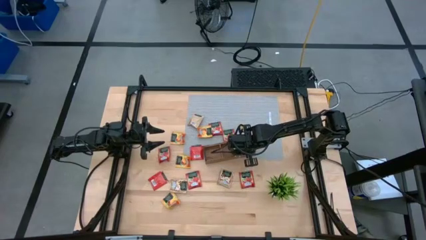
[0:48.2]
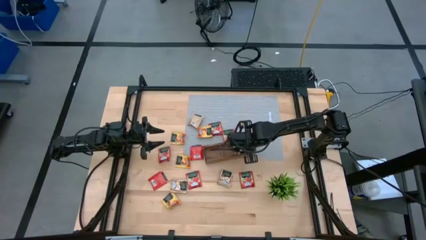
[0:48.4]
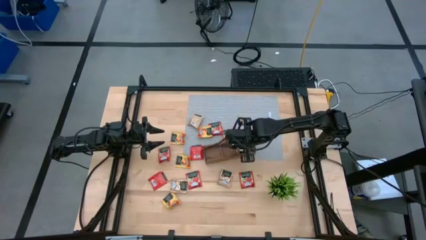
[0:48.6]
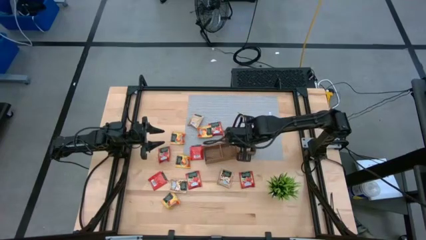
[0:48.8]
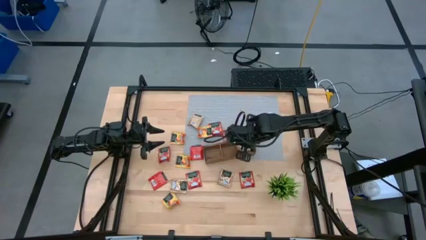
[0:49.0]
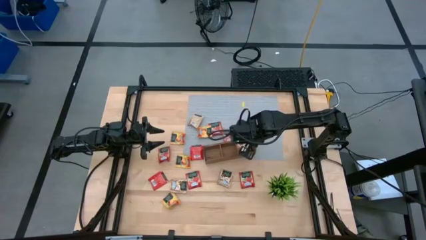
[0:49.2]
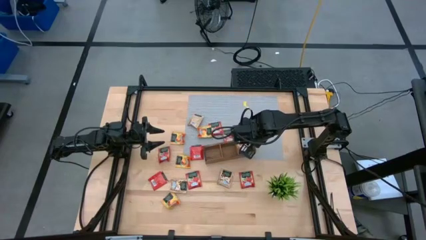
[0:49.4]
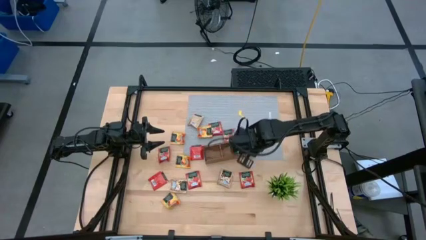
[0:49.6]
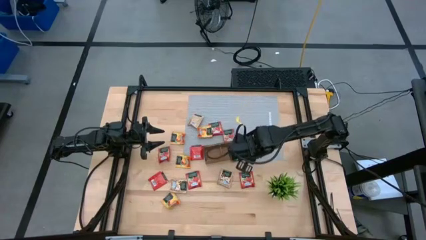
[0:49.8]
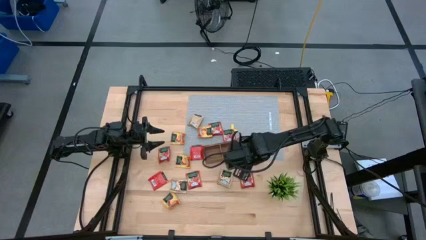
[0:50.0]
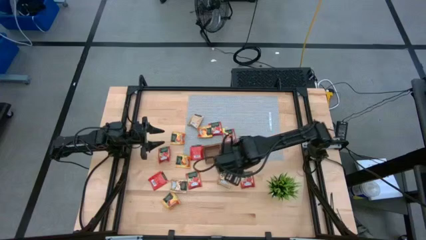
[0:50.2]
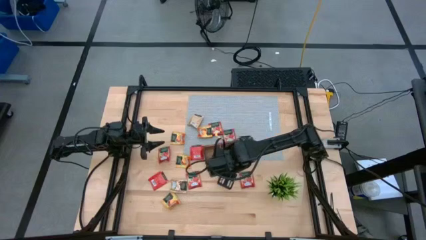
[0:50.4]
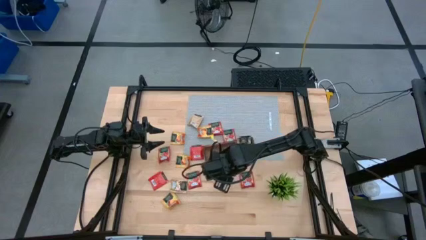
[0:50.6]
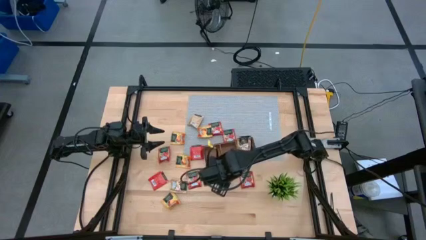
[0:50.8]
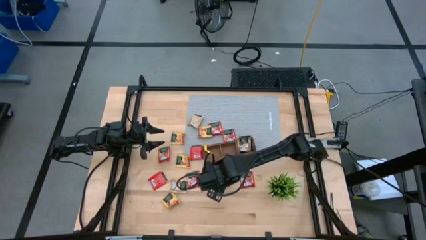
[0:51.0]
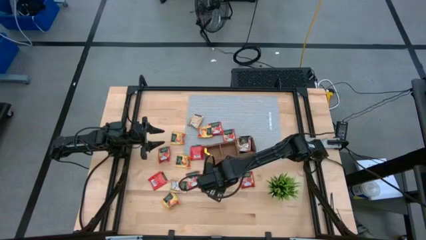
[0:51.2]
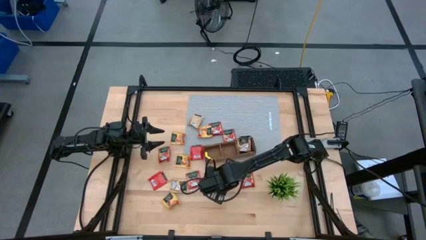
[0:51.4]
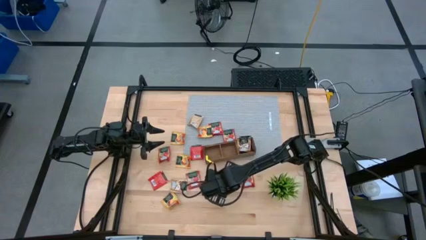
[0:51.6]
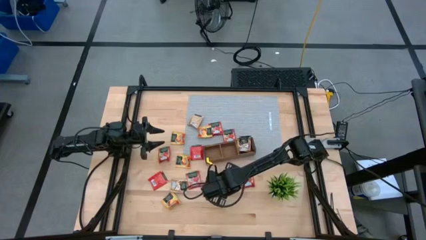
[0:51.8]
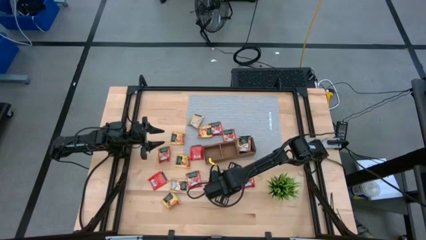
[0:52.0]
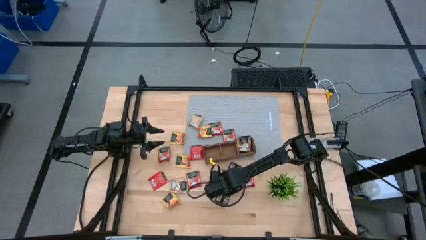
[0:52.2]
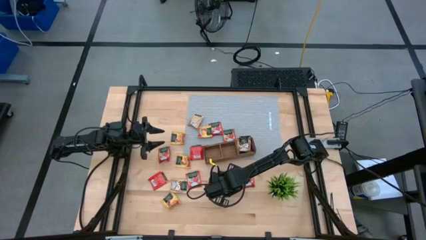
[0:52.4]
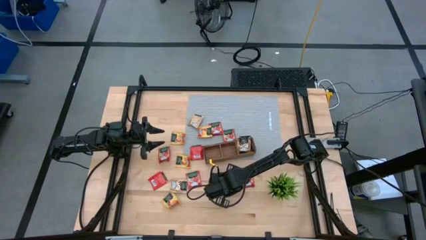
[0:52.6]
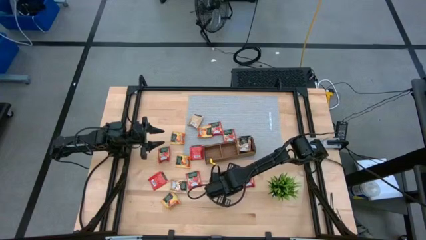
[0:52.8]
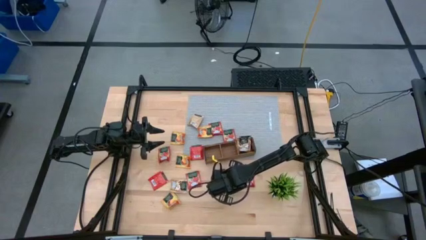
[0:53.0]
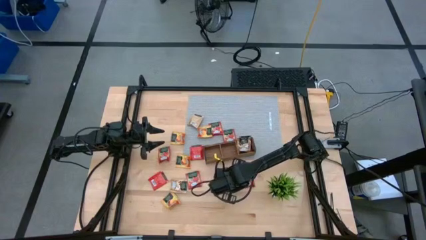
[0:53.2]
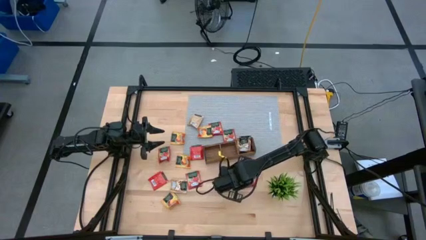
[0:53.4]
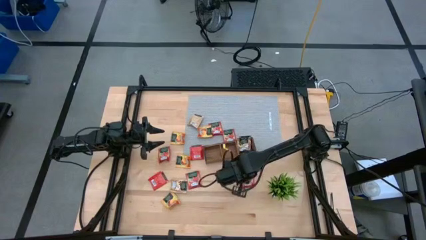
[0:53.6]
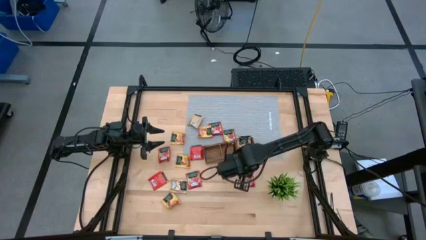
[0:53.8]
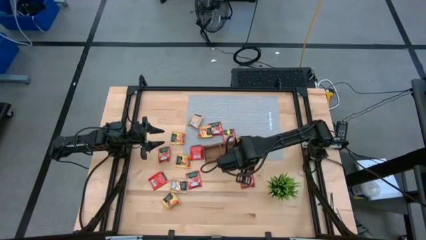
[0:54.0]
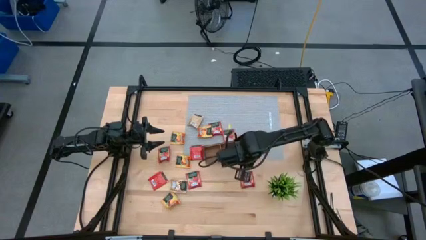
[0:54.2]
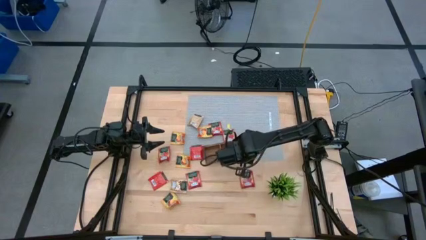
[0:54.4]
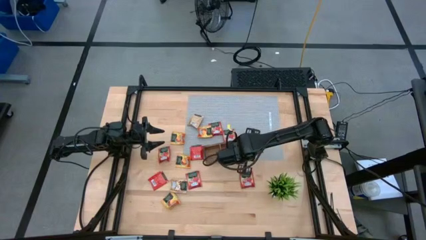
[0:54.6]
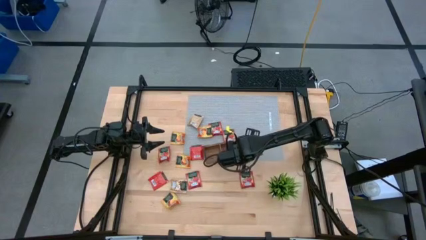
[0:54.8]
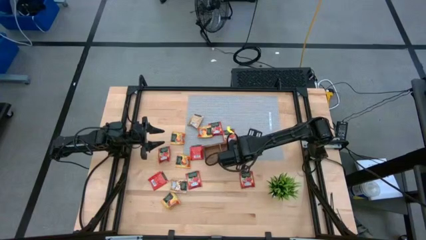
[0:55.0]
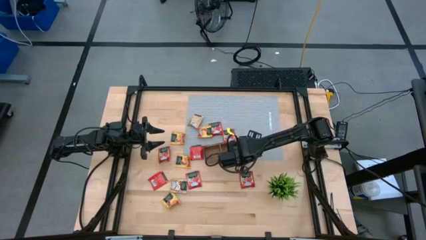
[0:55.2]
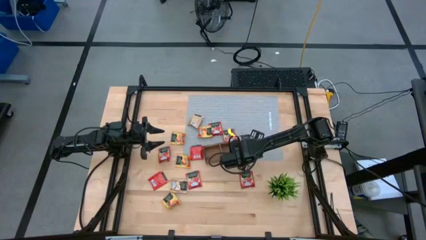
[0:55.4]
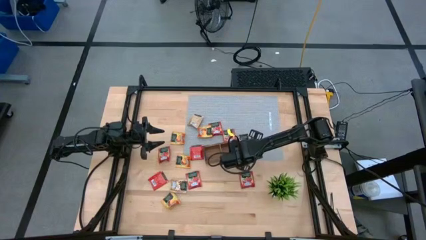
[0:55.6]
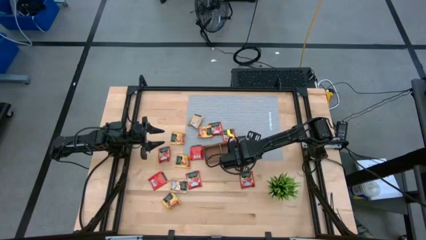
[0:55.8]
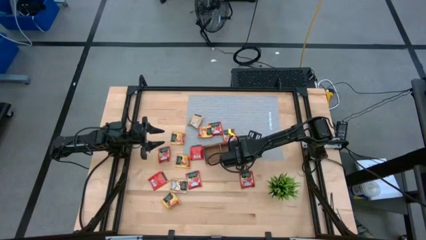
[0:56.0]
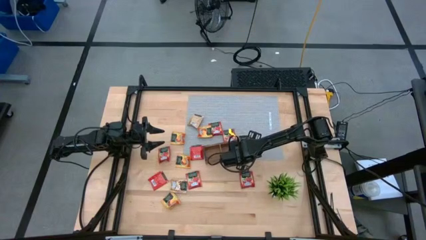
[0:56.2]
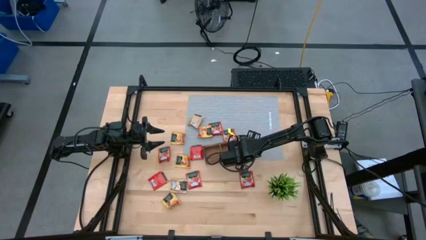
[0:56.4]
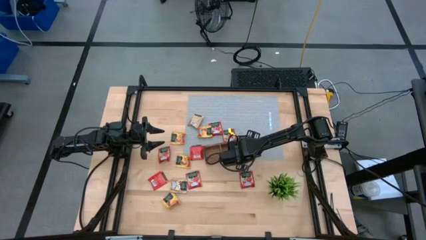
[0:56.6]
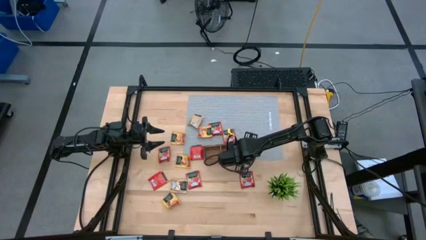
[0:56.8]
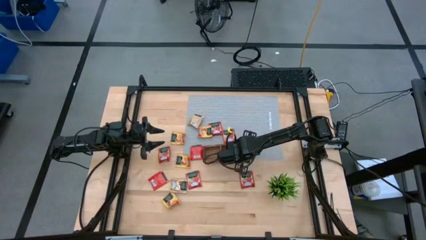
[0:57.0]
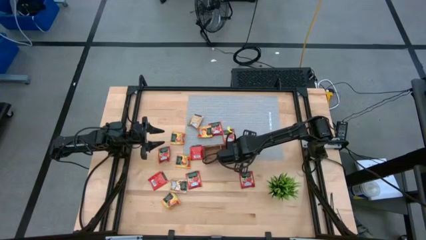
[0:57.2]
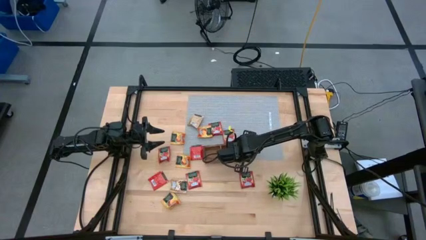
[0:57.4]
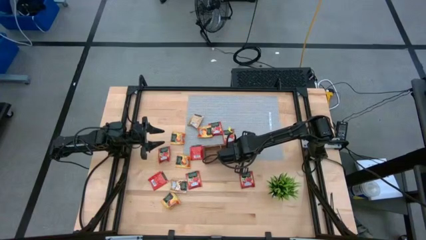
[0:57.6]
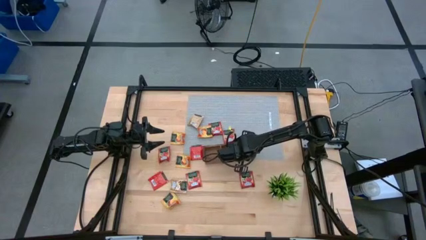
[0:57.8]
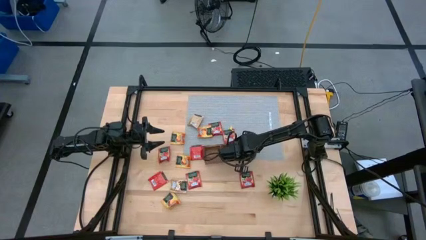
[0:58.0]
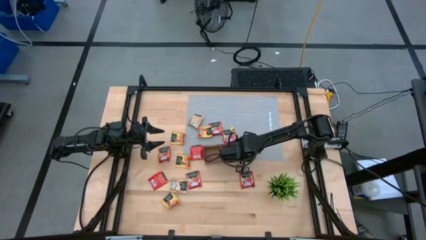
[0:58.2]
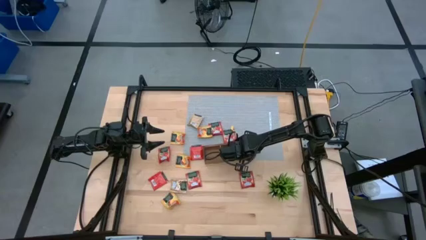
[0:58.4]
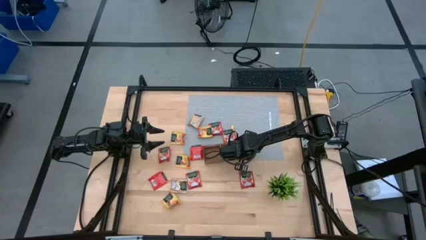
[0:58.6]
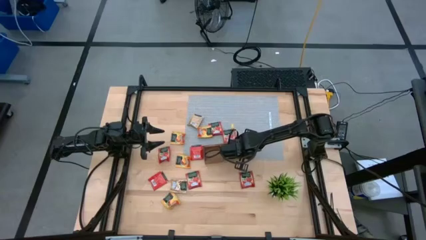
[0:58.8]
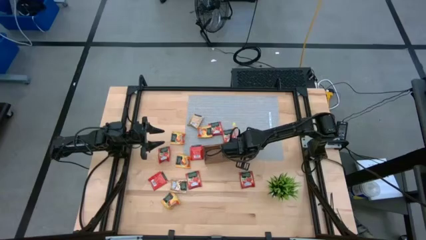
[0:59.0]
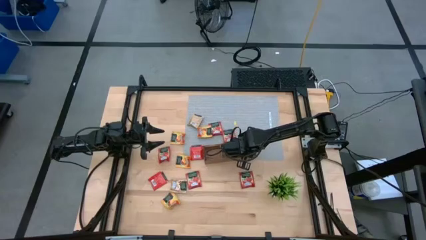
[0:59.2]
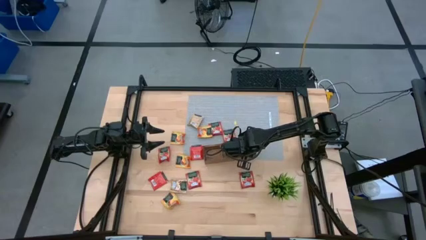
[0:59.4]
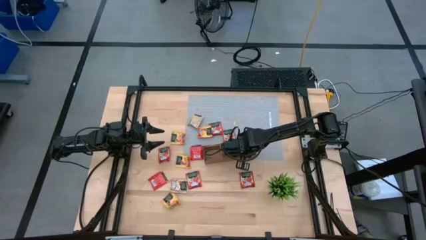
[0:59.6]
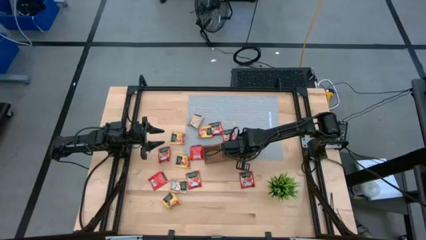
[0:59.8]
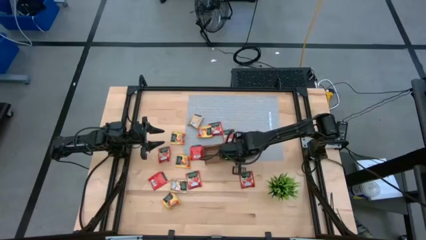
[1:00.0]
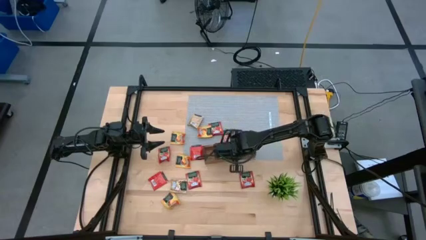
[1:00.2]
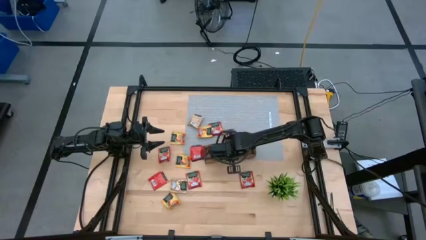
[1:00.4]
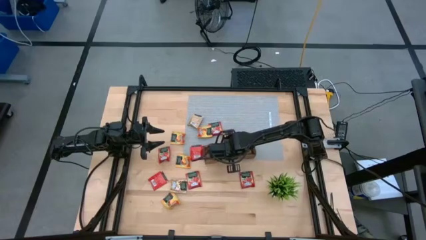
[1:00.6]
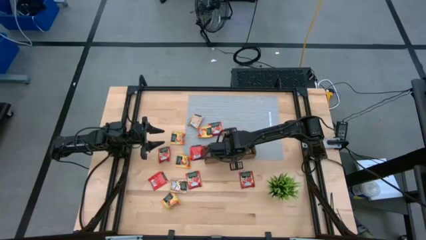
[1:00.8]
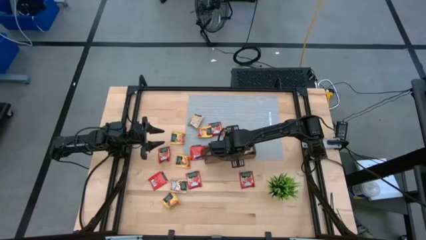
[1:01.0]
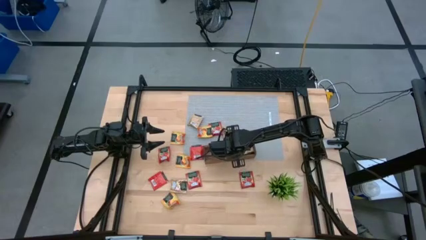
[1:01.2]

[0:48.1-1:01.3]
Task: Pick & Place Tea
Put the brown tea bag into the right section of the wooden organizer
